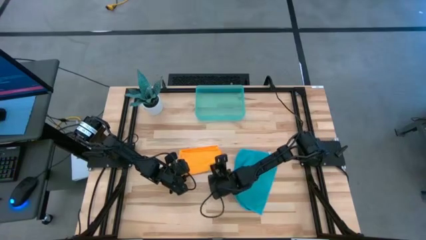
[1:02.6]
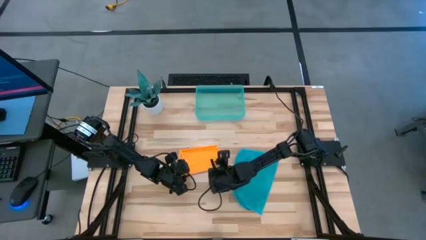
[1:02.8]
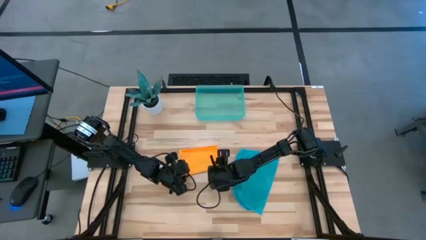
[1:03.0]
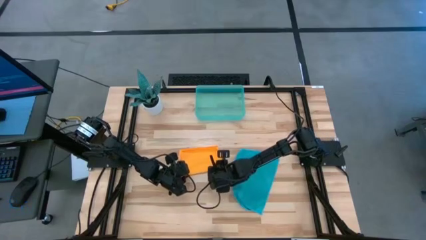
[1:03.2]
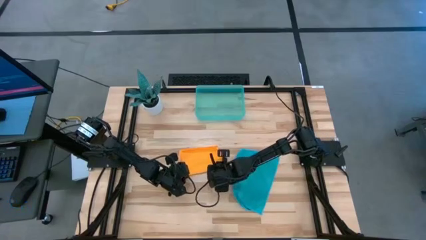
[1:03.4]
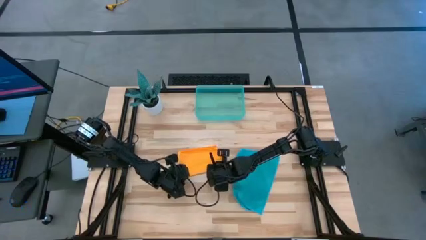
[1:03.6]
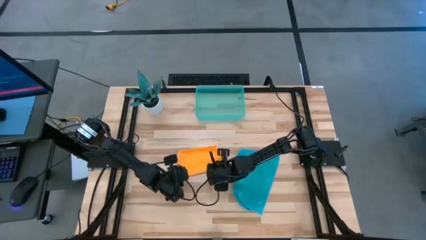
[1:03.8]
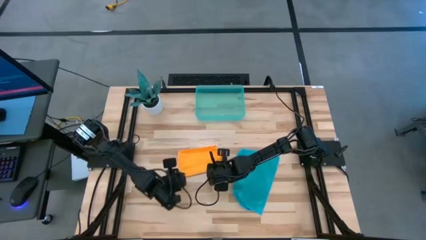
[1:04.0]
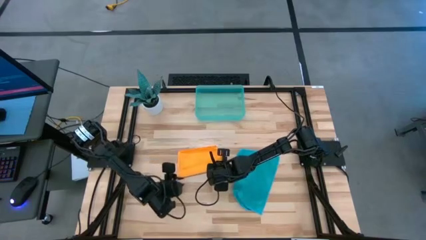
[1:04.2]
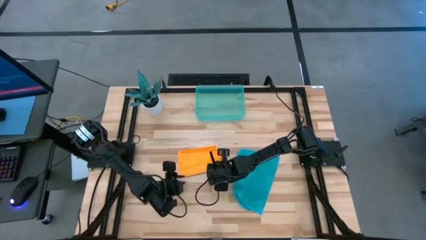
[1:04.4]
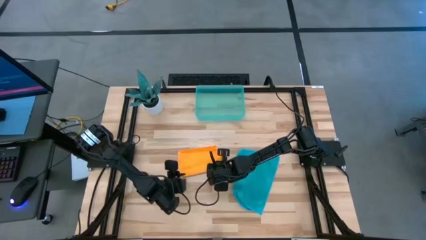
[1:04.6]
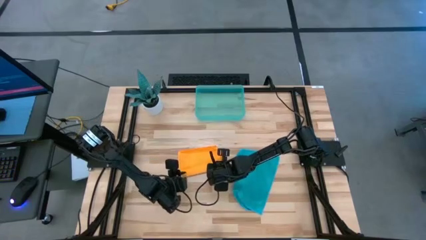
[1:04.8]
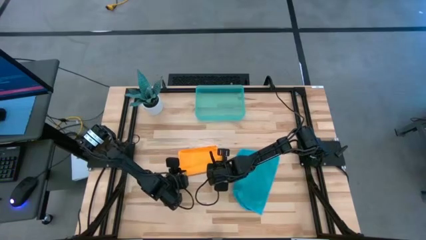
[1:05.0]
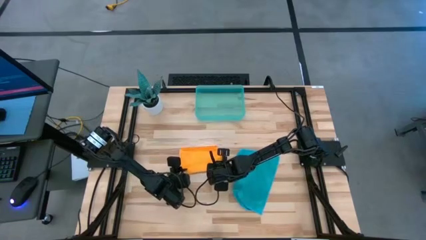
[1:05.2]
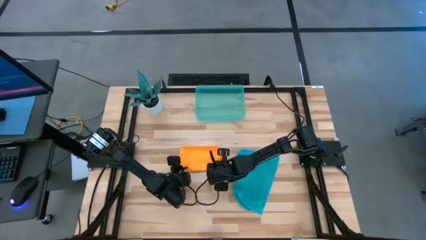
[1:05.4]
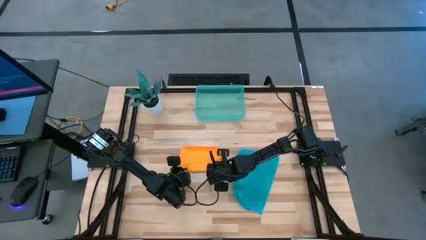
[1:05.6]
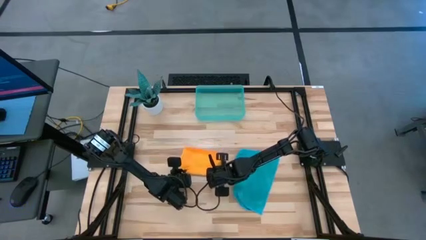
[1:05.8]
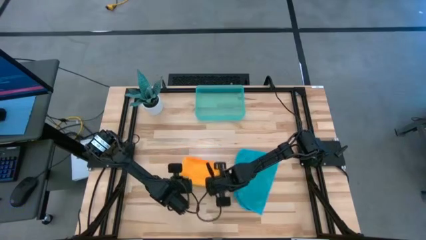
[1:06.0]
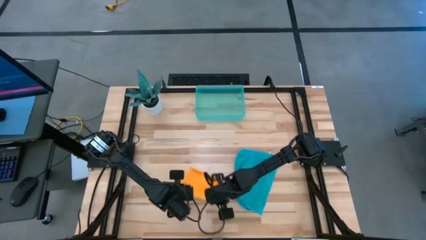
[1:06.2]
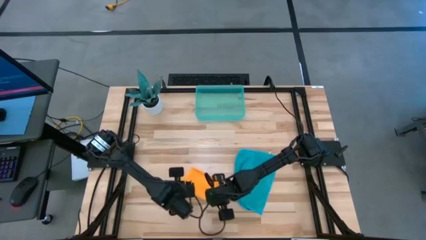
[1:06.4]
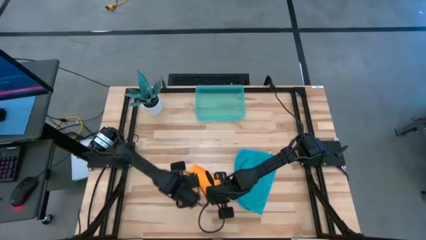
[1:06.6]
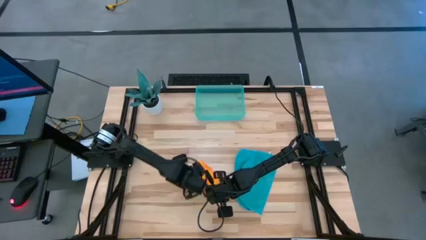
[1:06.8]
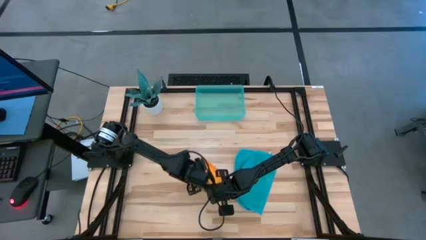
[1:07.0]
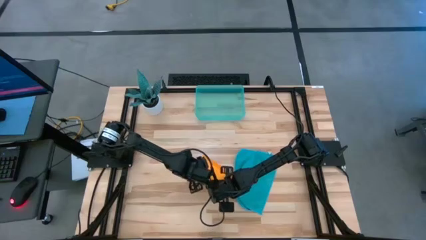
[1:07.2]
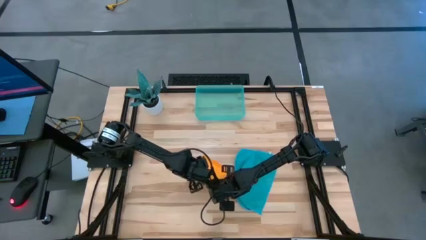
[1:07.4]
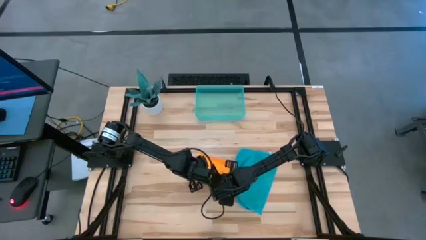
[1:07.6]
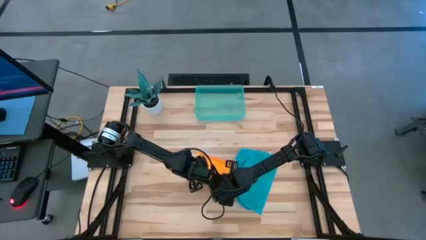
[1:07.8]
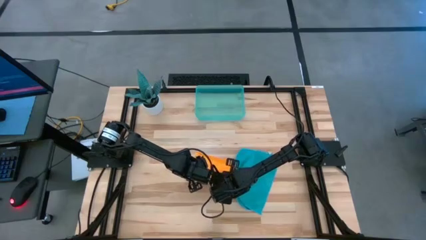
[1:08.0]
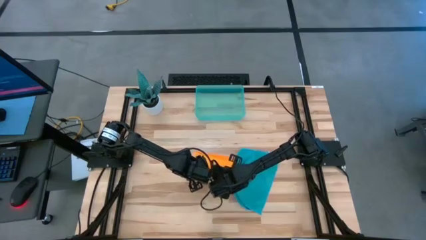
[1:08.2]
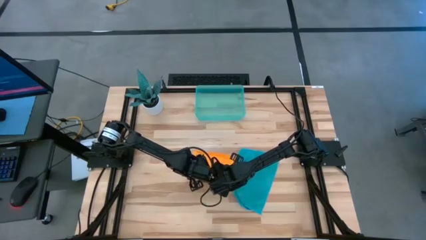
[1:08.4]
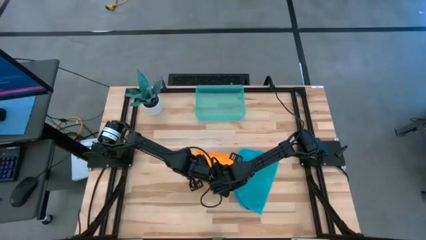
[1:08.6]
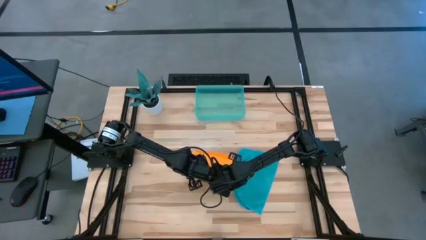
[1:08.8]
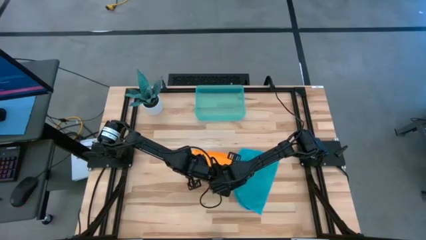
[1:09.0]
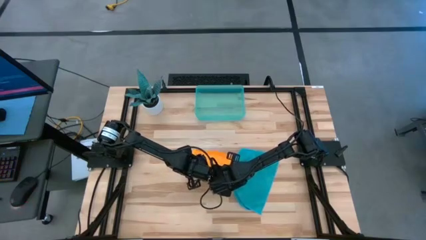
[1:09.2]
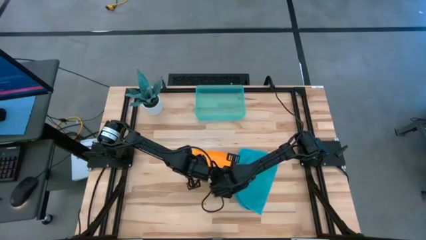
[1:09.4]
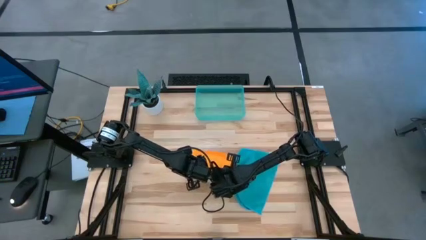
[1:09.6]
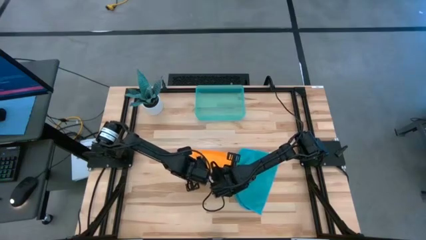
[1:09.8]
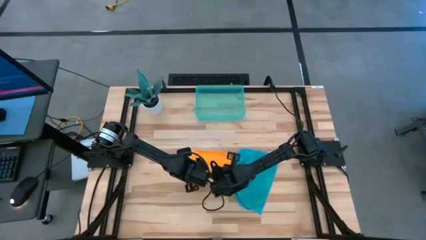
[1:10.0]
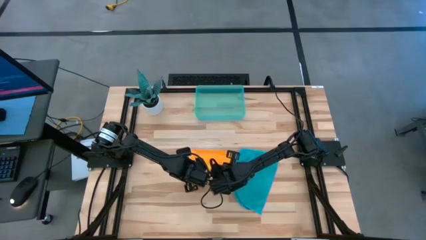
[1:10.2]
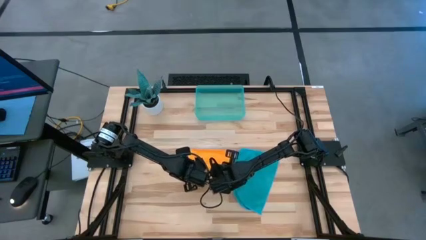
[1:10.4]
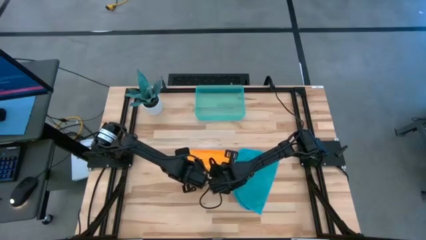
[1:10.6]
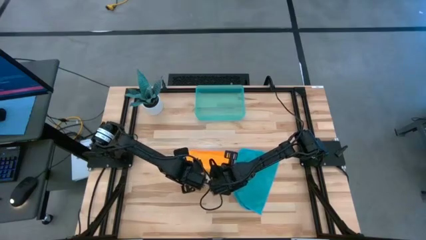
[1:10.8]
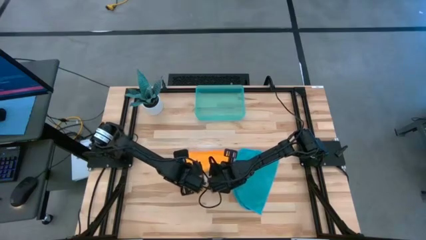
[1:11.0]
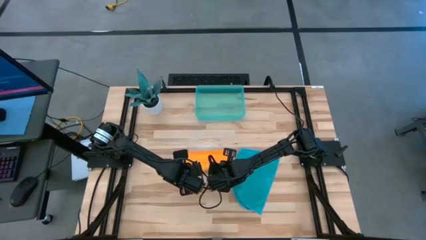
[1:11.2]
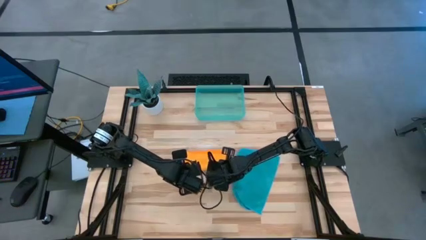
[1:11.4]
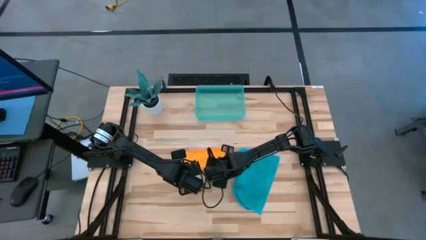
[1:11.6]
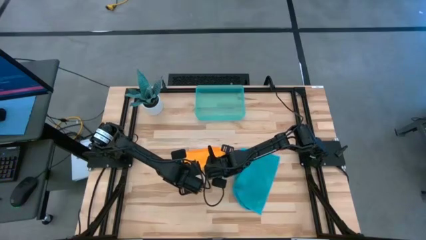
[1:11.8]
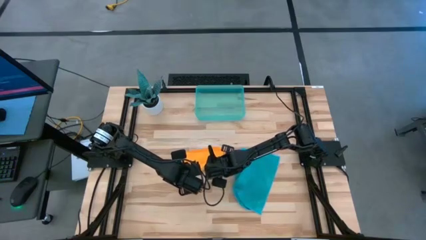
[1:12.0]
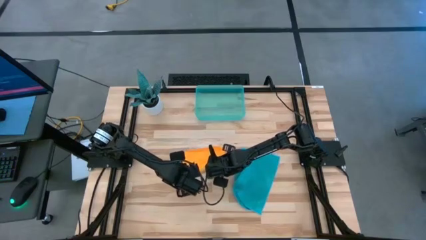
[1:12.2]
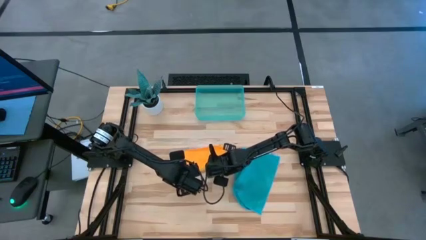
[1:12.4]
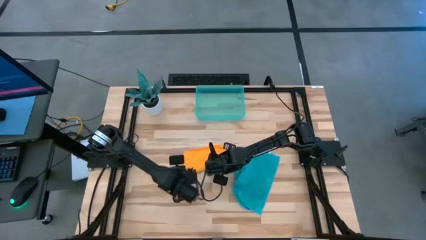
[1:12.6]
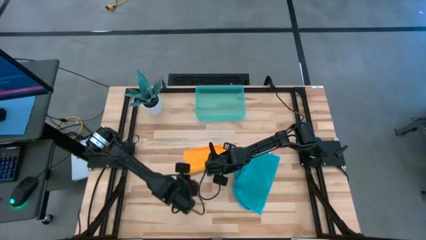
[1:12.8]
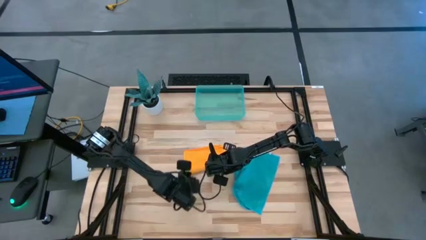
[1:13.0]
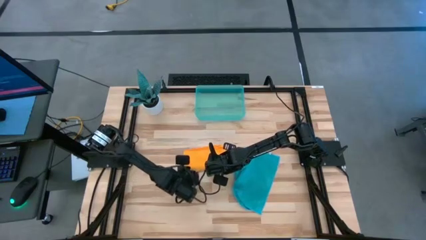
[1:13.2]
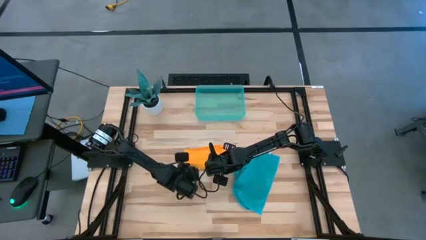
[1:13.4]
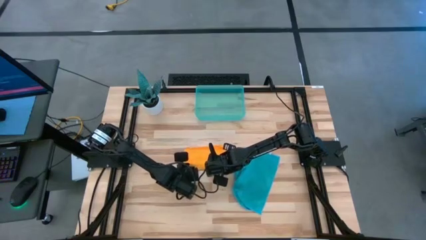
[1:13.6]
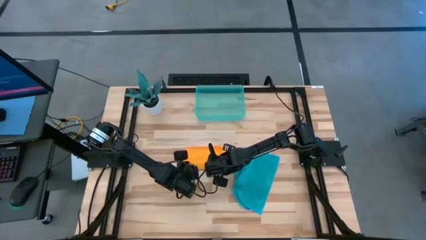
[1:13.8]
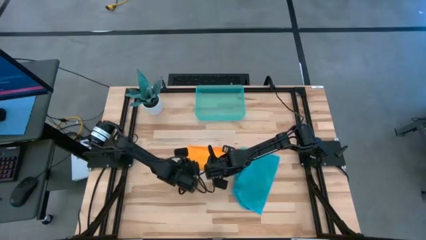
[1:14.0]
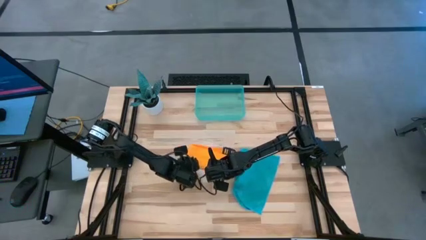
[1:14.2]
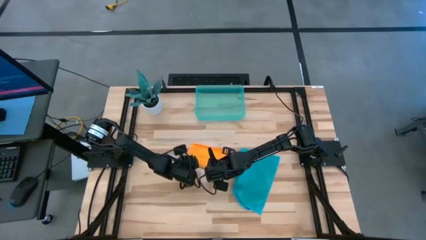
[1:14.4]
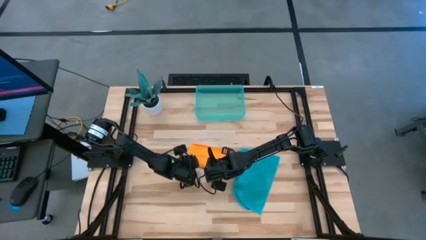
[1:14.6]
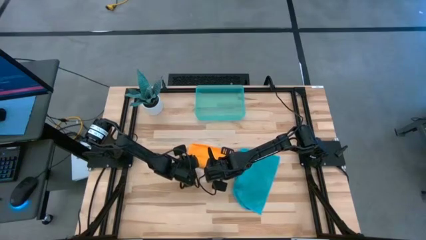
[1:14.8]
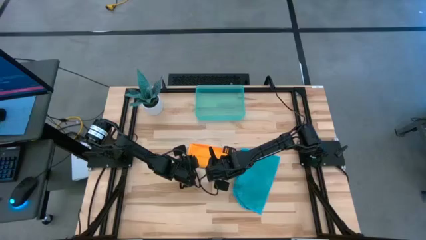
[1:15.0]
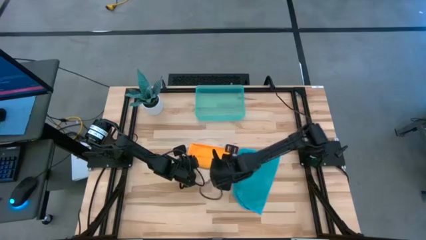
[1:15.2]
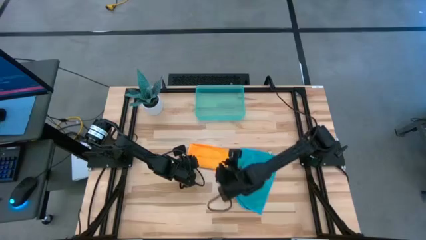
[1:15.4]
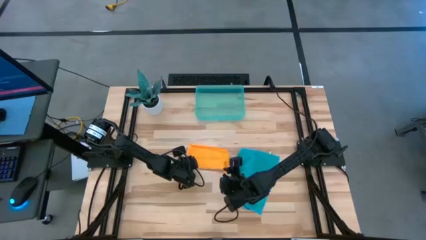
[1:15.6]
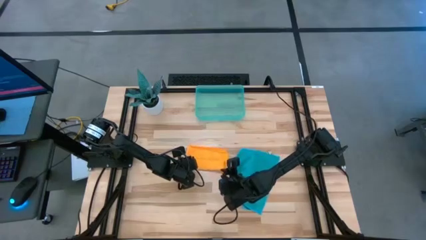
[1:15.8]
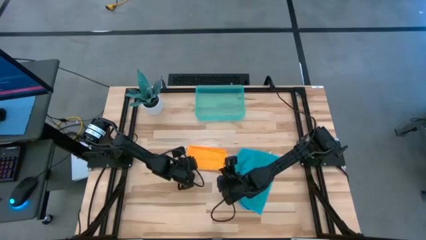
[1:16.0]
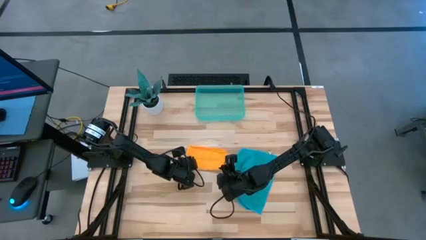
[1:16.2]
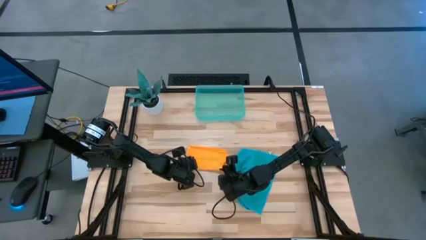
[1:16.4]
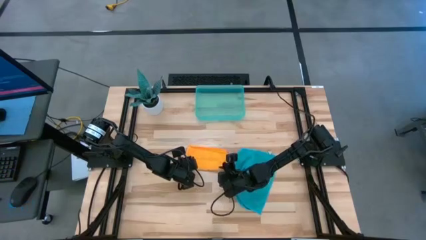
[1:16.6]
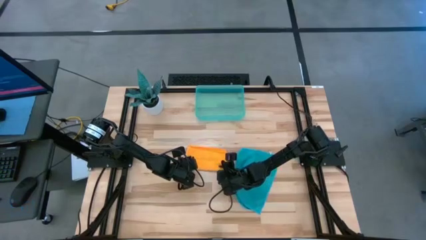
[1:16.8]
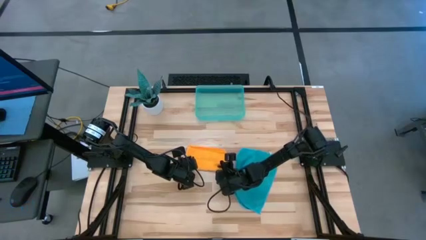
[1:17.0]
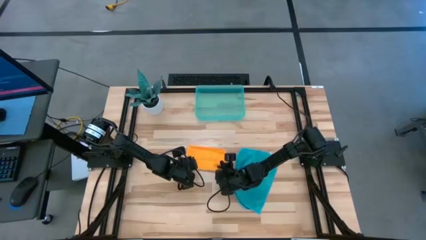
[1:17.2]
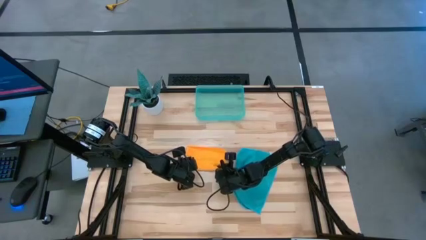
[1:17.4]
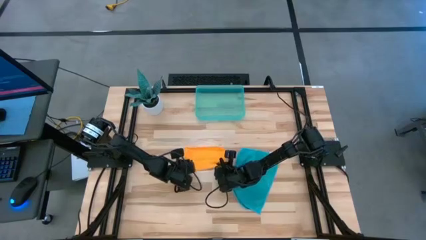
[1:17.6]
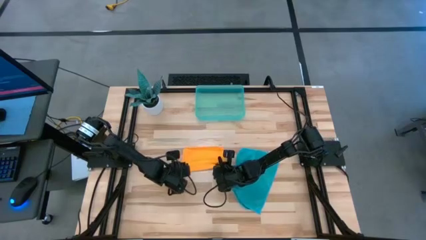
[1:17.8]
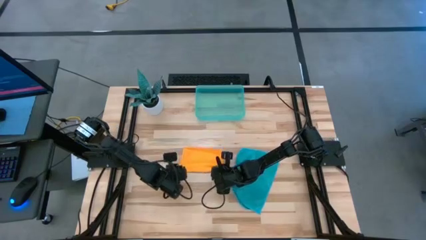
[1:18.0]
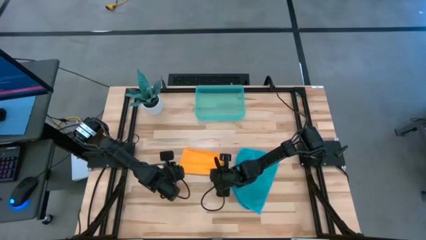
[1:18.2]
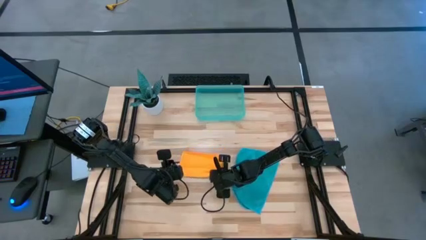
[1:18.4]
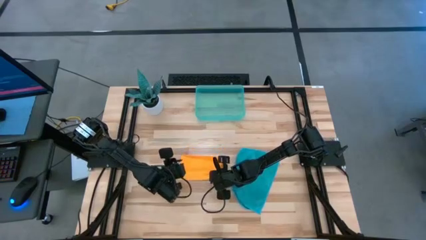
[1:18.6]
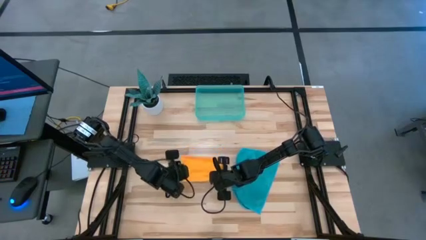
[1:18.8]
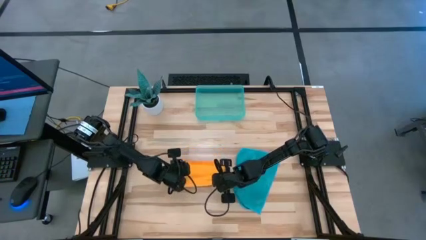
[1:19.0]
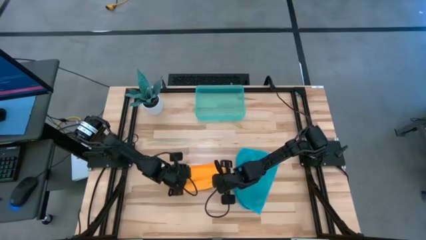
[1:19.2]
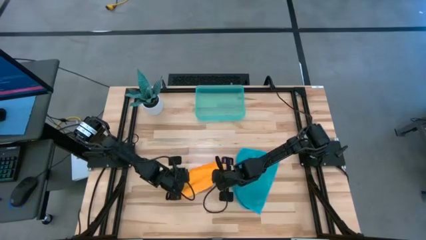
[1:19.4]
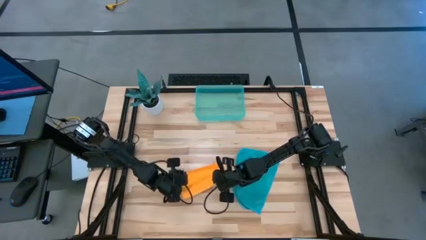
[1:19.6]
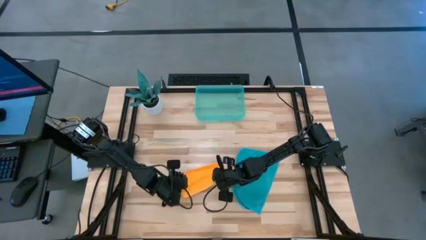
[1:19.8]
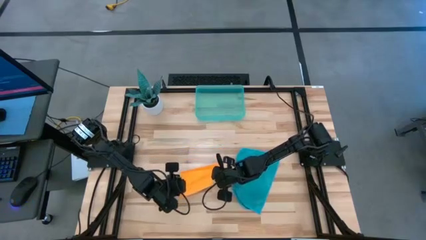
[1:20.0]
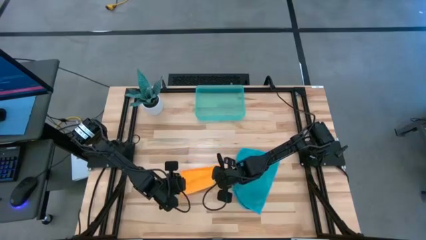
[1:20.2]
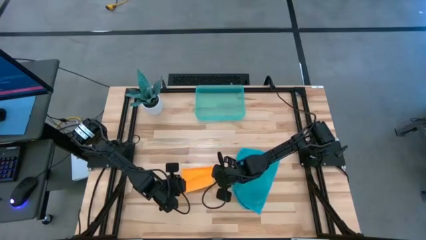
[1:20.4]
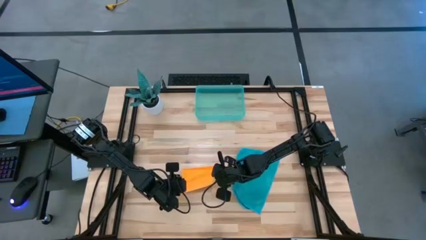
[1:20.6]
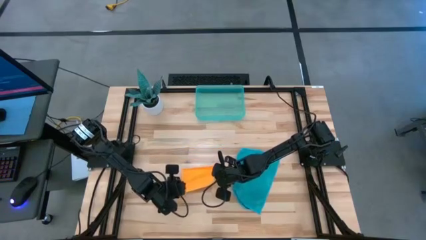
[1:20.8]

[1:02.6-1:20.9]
Task: Roll microfiber towels into tight, uniform cylinder then place into a basket
Roll the yellow microfiber cloth
